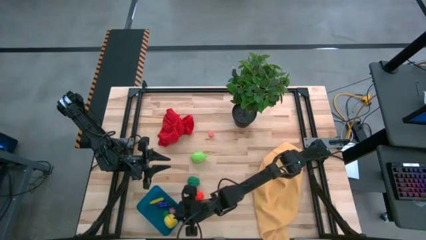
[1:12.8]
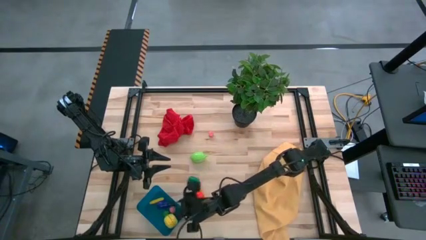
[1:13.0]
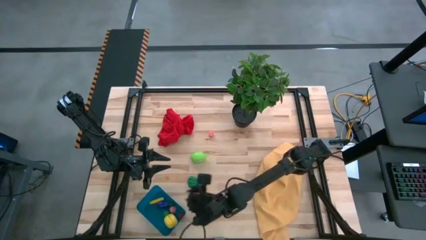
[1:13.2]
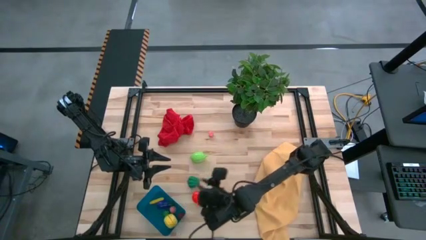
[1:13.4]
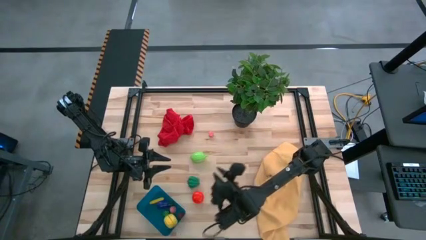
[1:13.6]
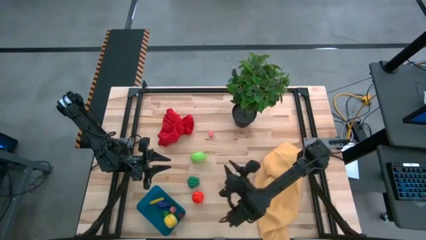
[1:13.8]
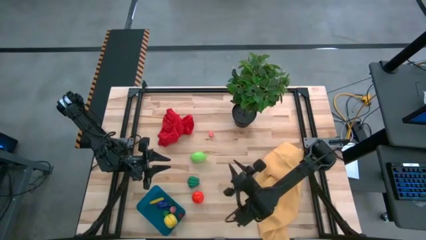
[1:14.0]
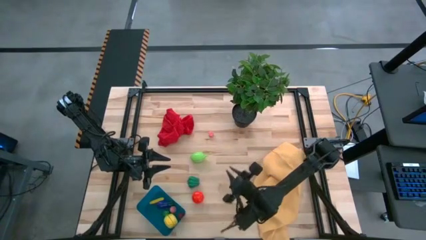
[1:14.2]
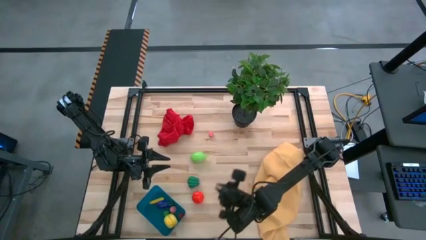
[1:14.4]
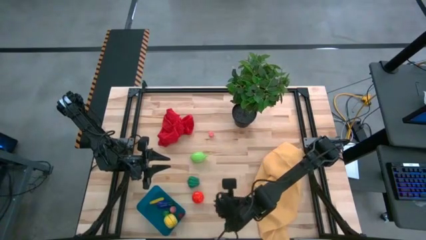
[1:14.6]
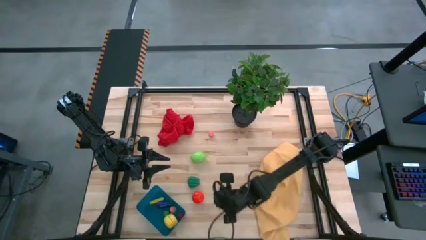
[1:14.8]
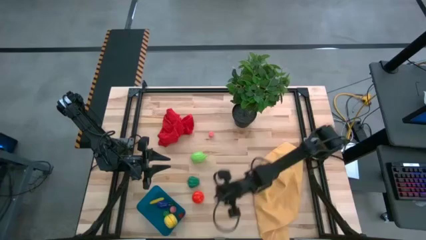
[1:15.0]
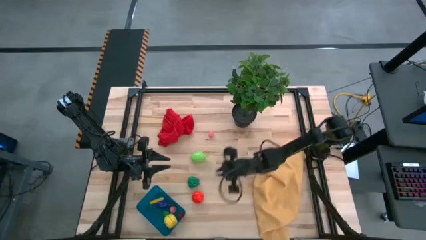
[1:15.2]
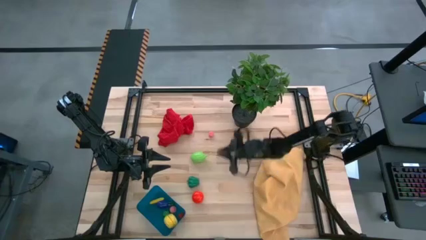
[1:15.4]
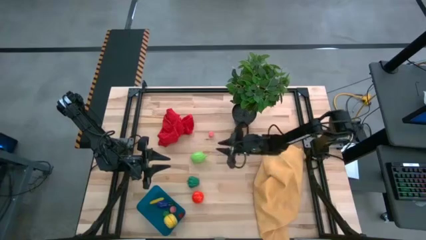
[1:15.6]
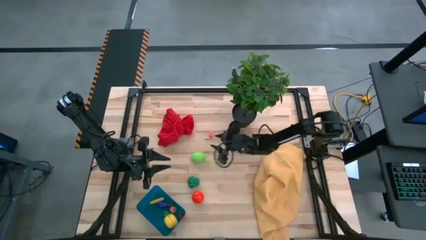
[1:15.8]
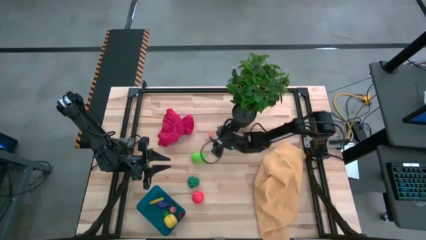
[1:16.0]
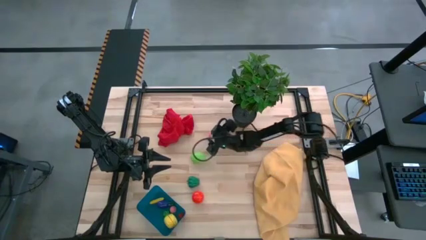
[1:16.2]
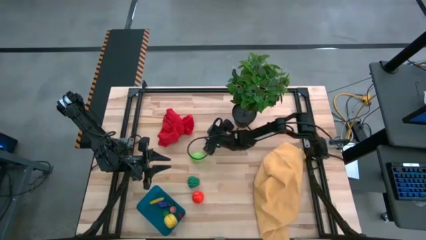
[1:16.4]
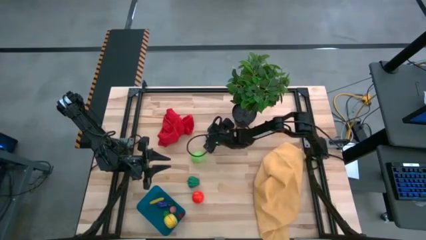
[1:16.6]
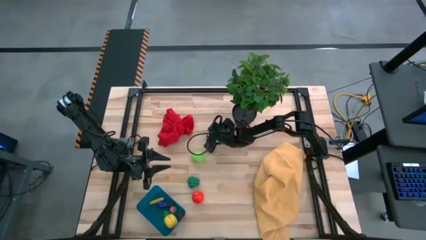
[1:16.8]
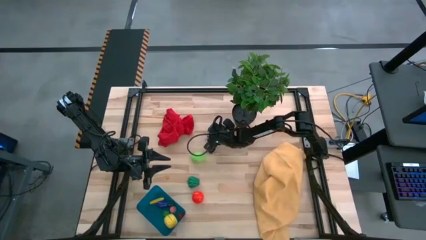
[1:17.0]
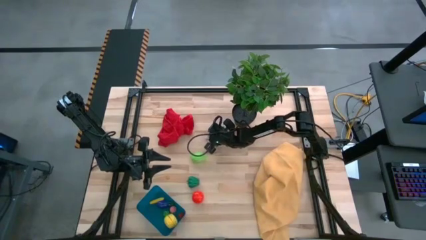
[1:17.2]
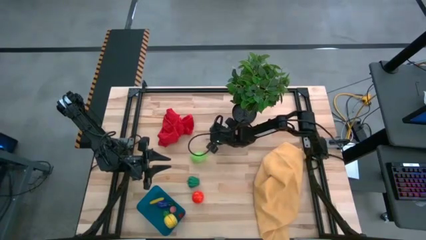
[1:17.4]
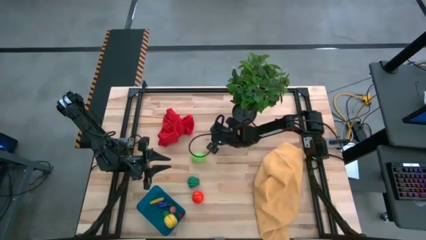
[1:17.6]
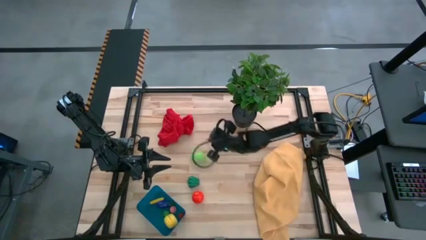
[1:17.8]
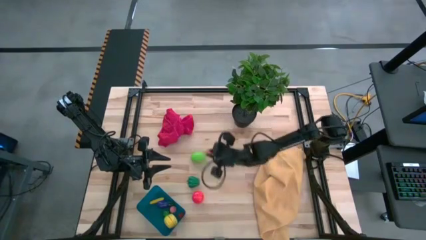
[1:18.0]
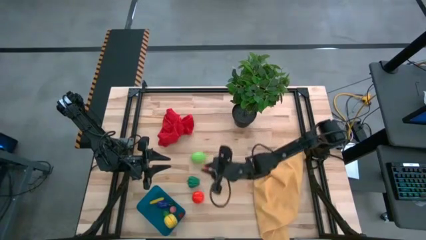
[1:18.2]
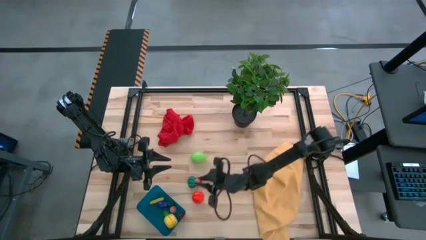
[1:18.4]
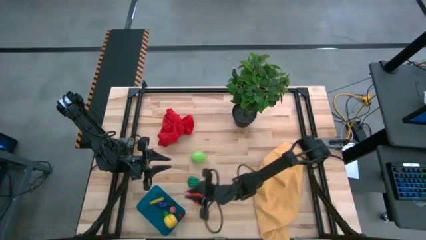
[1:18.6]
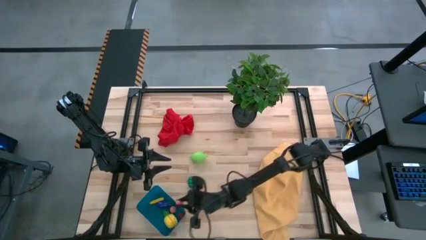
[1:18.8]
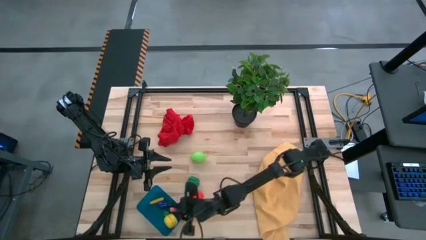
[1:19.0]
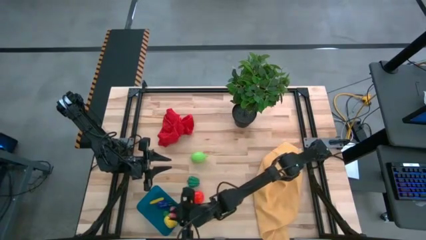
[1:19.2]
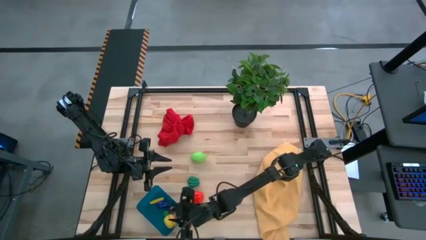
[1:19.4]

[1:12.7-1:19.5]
Task: Pick and placing Produce into tupperware
Put the pink peach into the blue bin

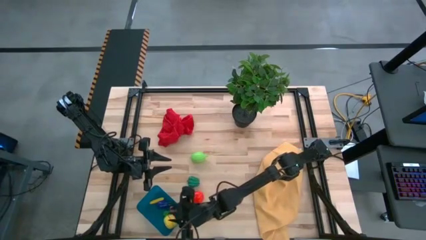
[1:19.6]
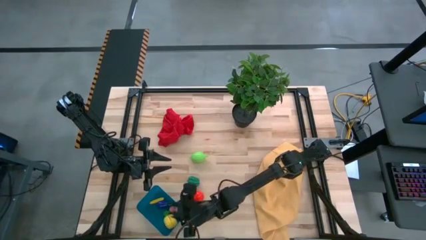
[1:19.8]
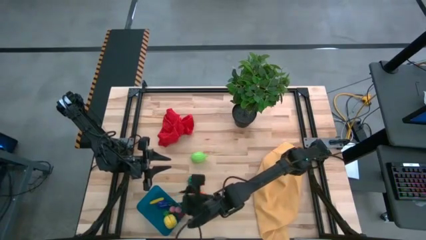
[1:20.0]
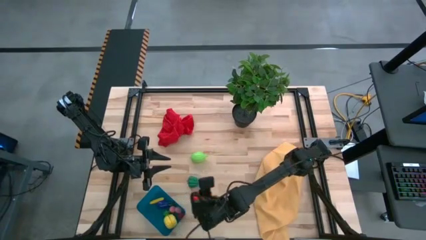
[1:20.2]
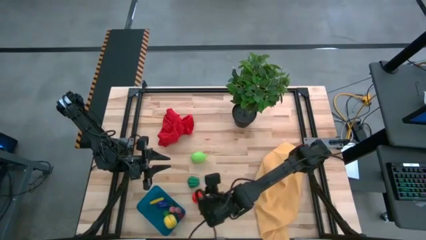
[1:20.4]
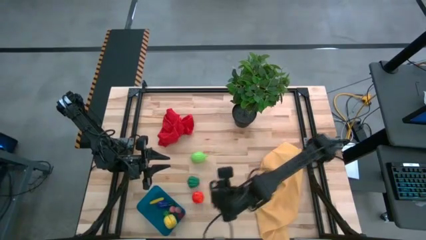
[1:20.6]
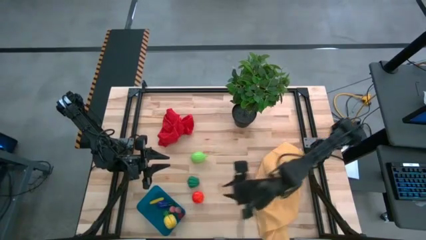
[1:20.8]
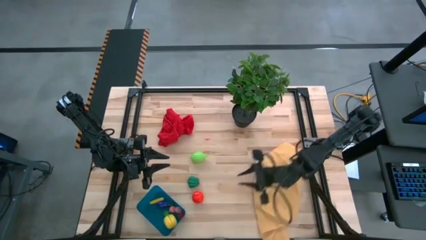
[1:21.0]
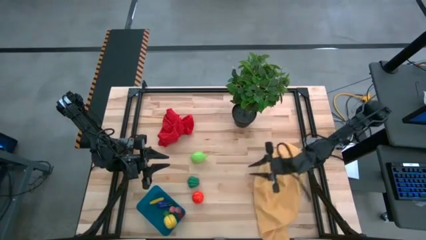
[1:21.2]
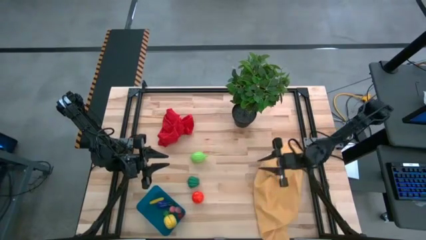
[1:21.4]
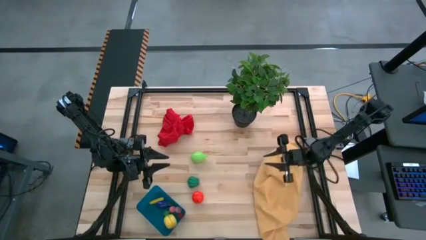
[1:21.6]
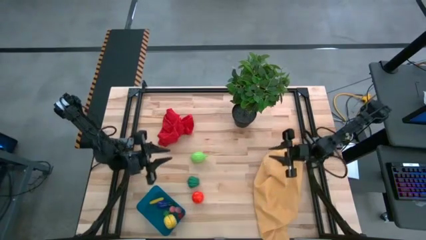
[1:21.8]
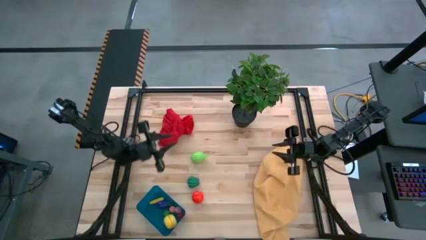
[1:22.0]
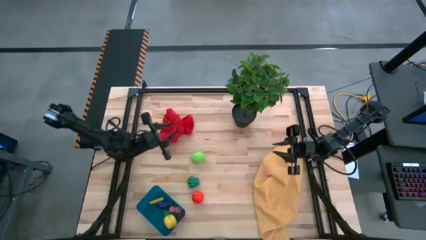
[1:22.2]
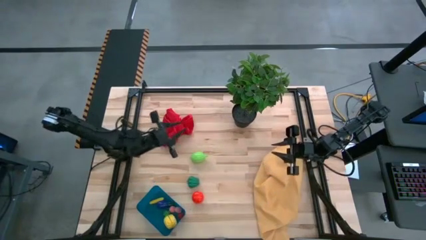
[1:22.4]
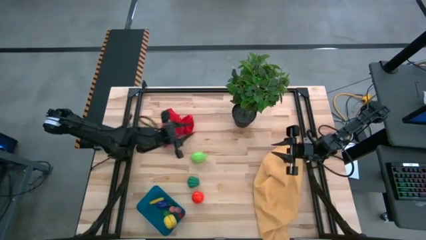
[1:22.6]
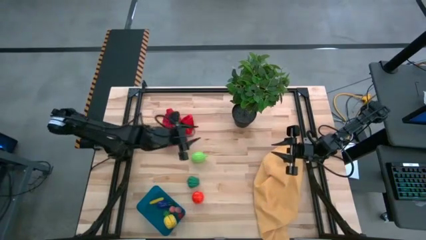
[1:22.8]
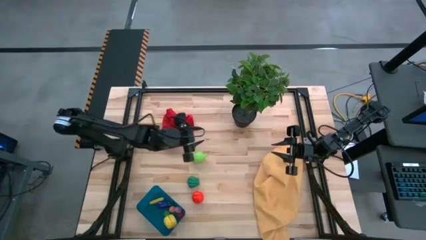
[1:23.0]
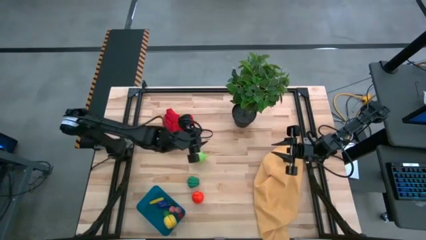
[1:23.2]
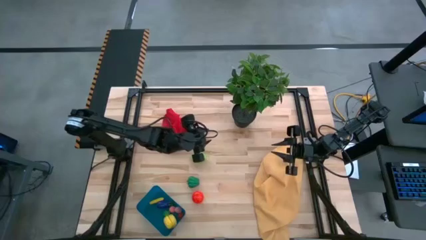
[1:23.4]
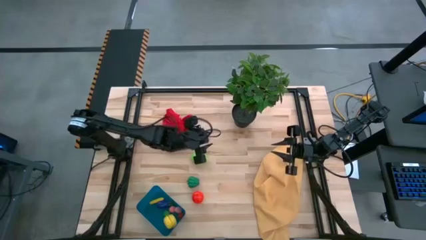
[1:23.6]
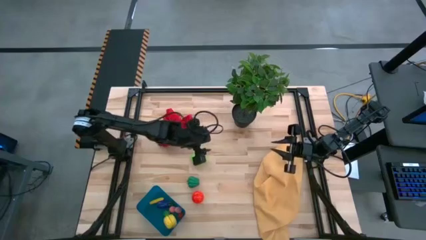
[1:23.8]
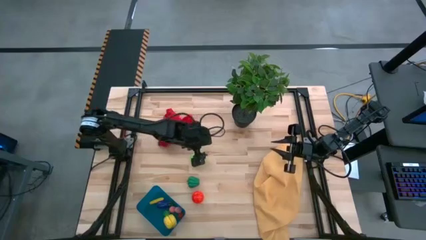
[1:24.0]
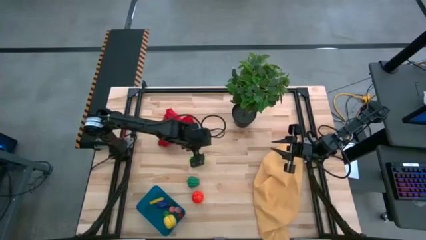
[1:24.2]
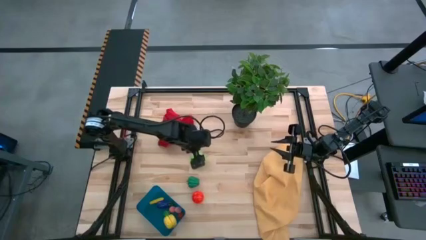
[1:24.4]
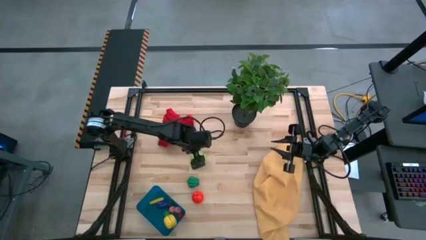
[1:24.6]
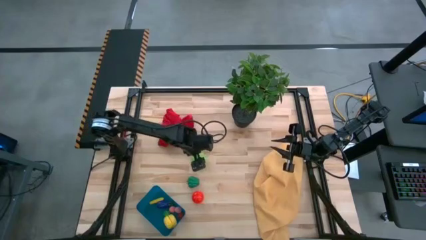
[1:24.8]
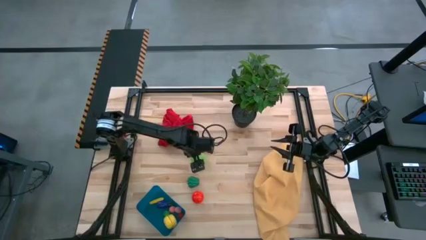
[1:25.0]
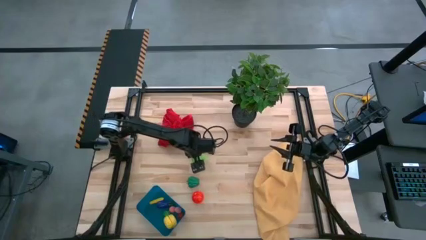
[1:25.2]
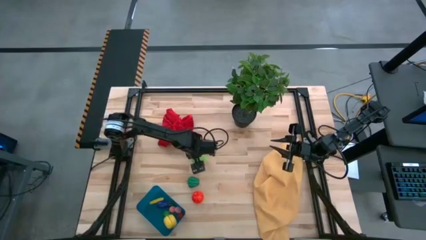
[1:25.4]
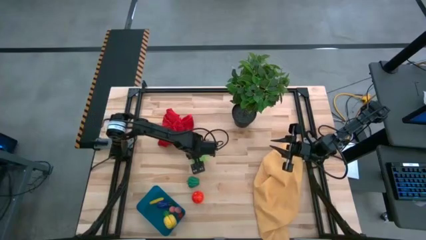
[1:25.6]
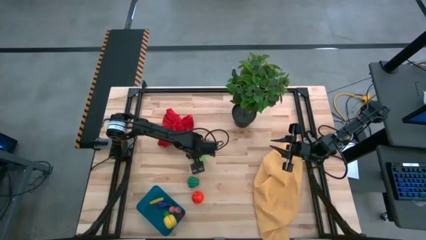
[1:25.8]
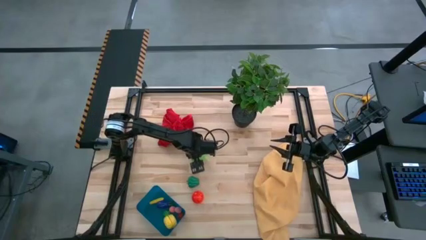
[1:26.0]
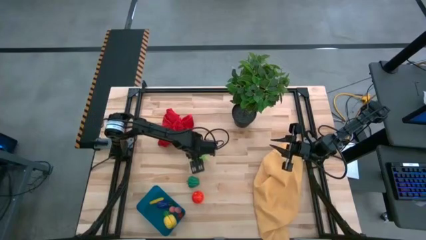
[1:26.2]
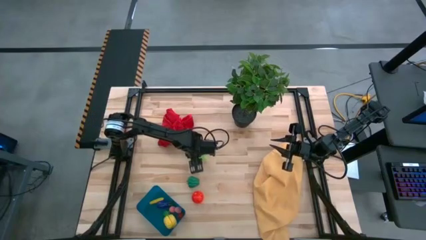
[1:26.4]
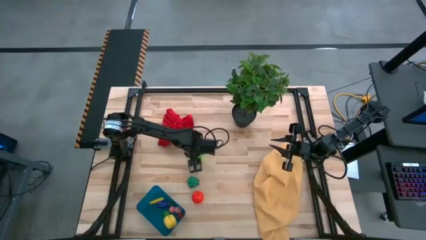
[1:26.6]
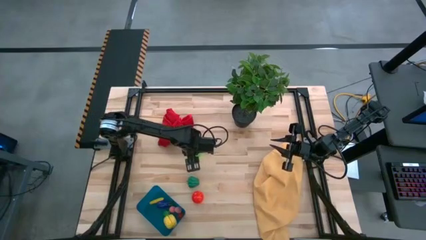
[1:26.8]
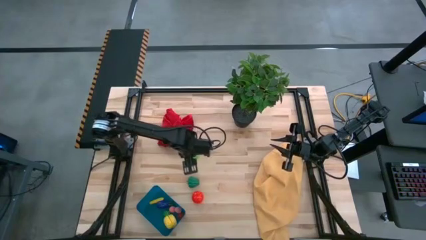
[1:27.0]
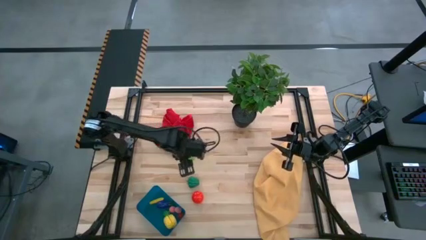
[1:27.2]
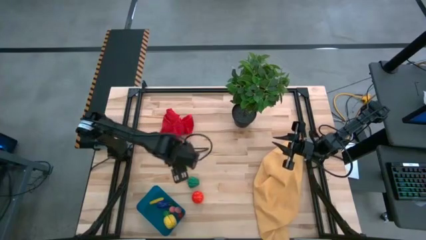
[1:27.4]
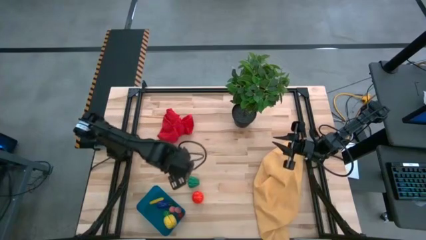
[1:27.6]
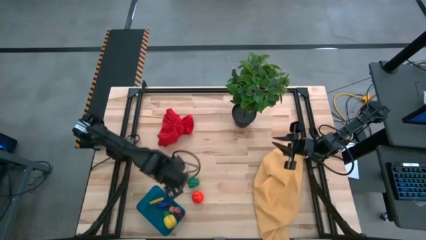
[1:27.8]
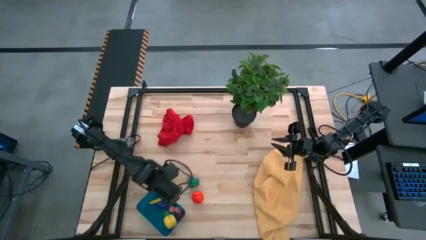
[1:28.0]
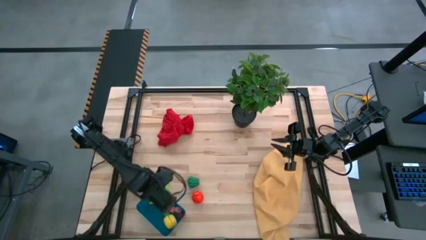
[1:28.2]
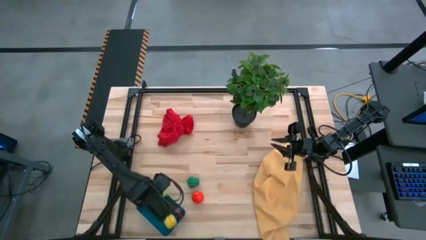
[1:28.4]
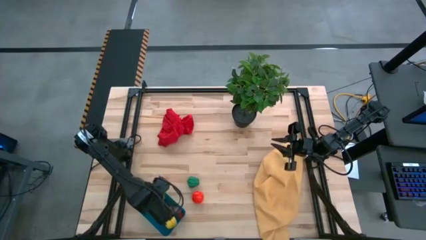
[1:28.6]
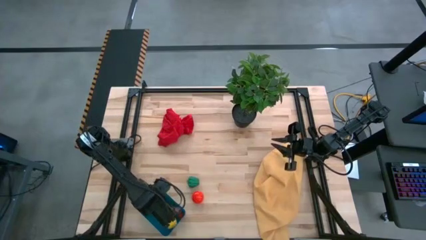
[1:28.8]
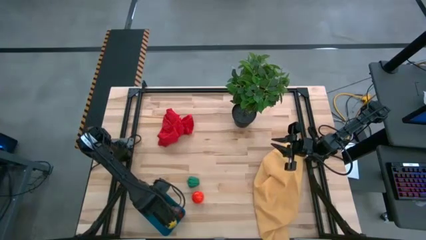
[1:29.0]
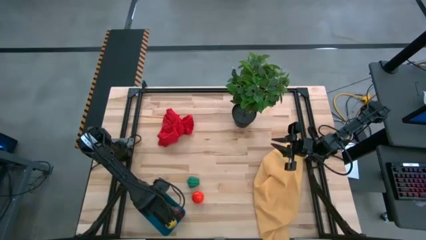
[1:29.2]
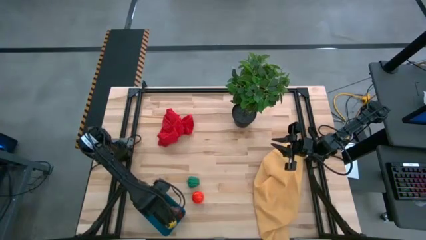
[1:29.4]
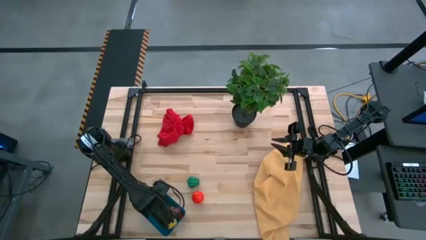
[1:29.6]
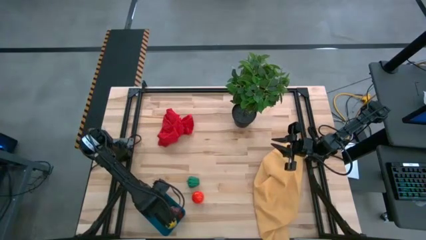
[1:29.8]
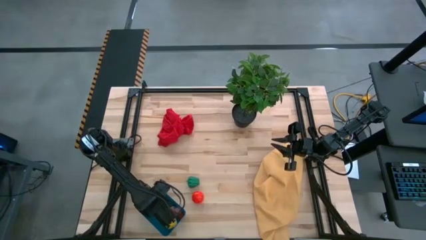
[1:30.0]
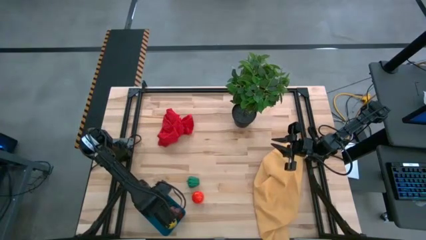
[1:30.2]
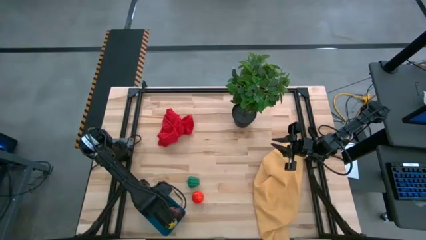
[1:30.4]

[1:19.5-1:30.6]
Put the green melon into the blue bin
